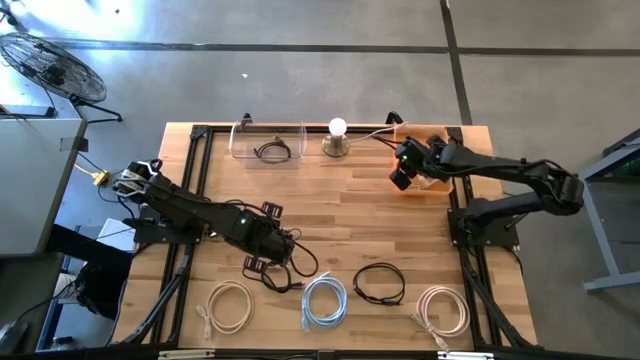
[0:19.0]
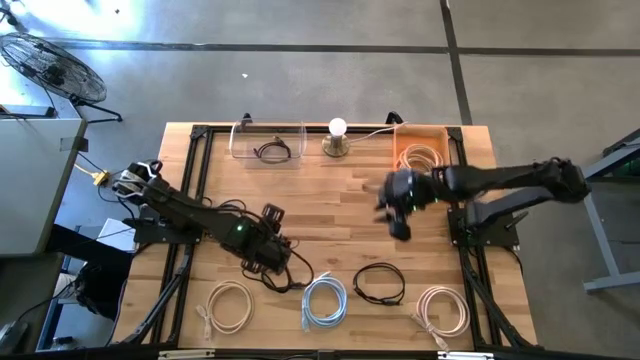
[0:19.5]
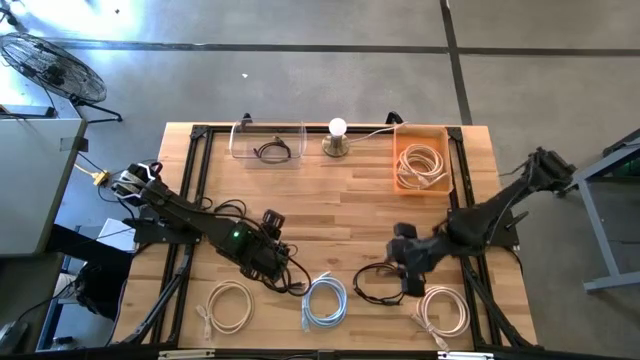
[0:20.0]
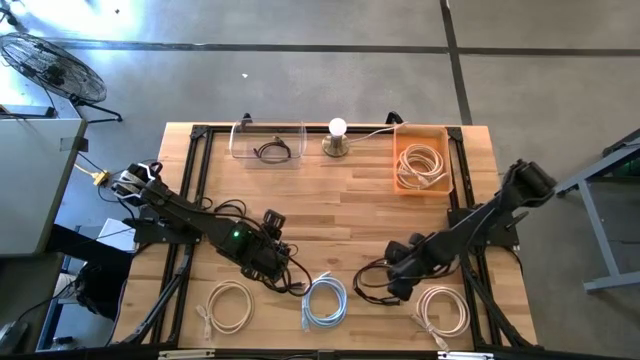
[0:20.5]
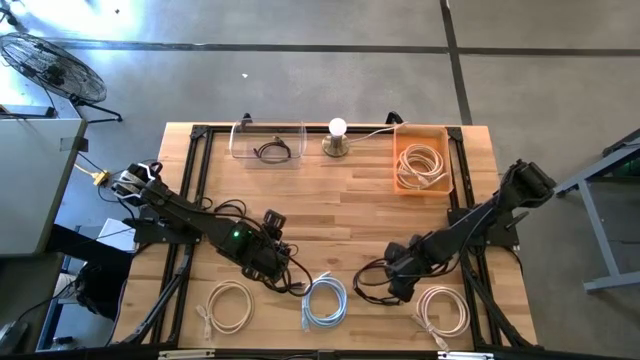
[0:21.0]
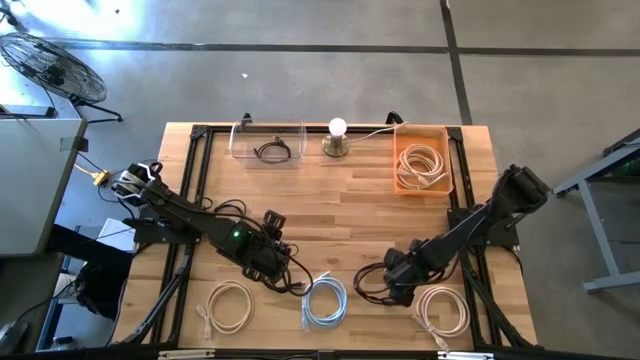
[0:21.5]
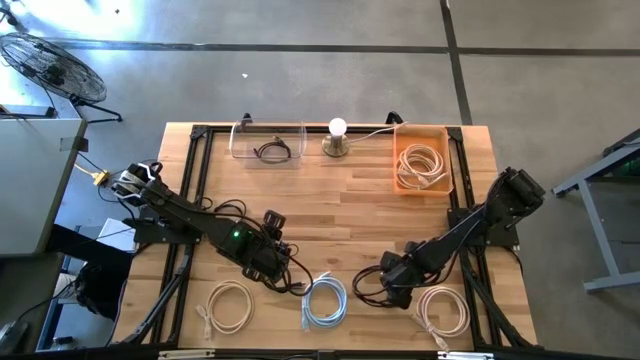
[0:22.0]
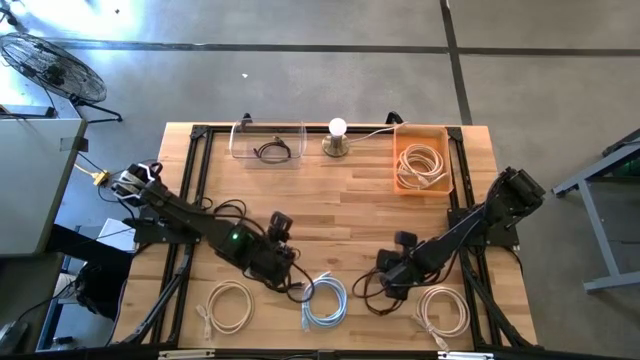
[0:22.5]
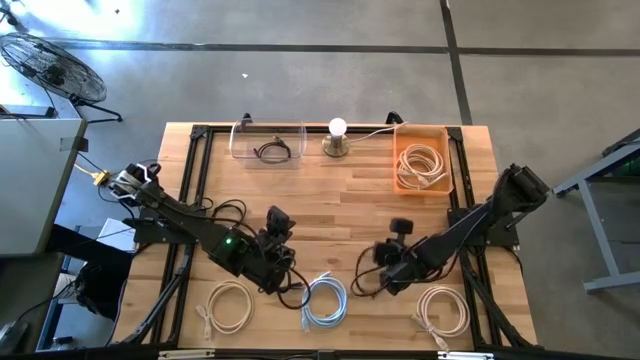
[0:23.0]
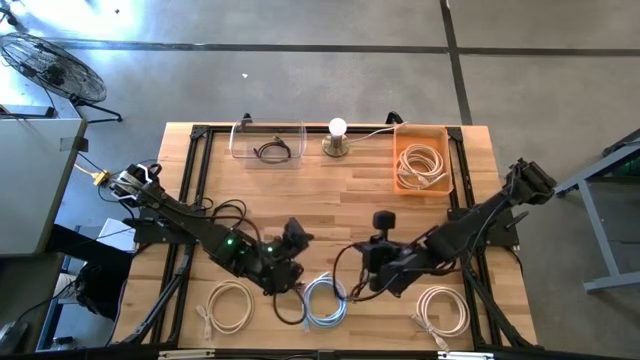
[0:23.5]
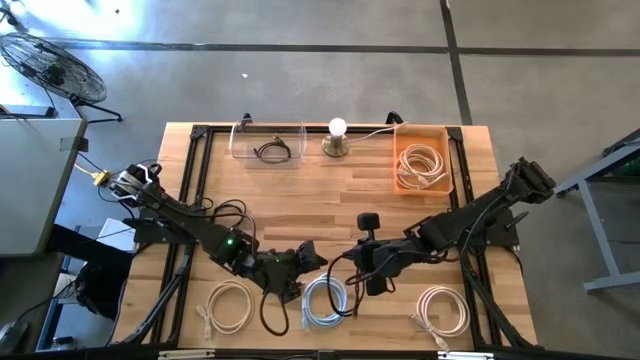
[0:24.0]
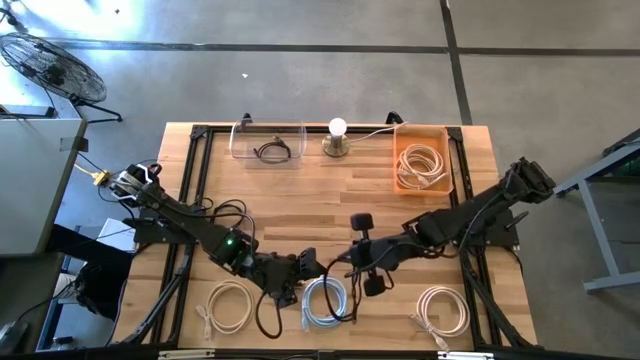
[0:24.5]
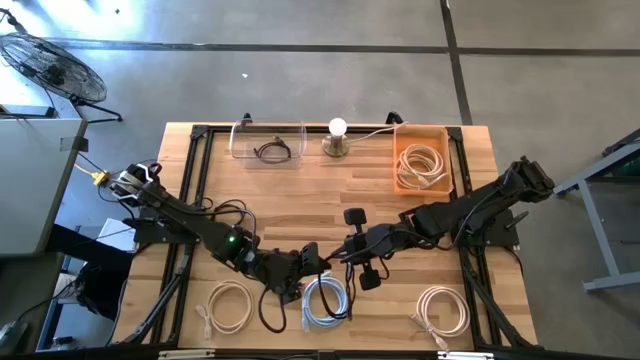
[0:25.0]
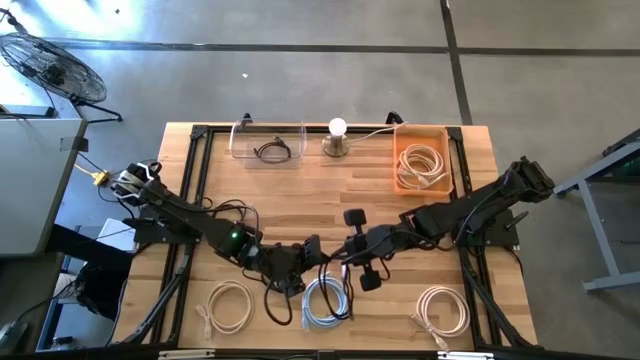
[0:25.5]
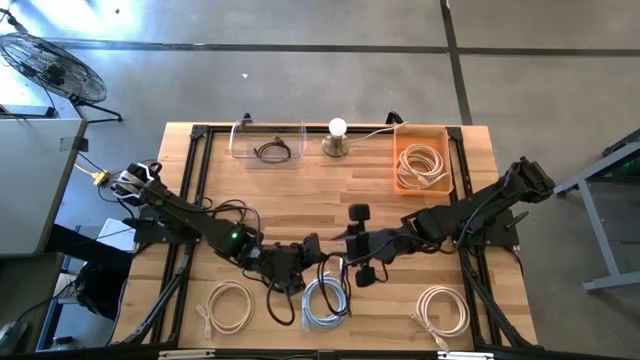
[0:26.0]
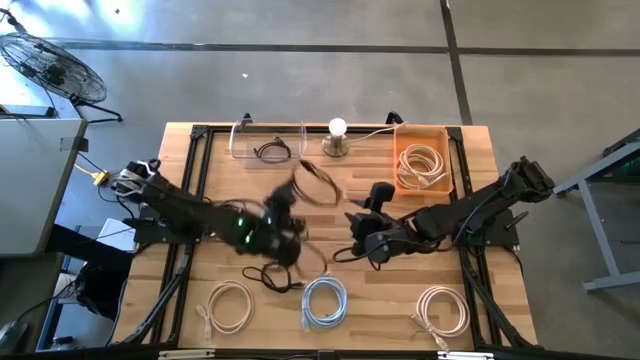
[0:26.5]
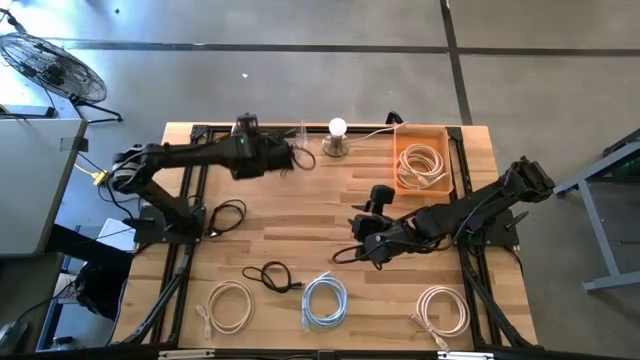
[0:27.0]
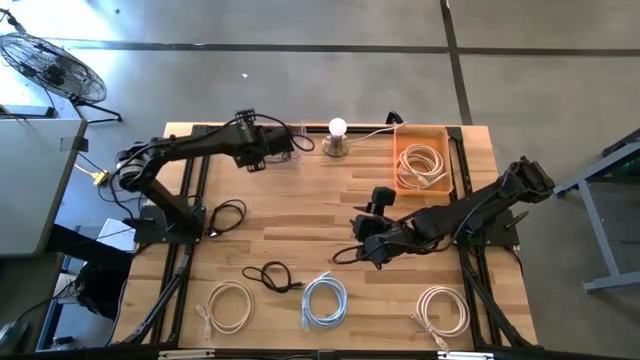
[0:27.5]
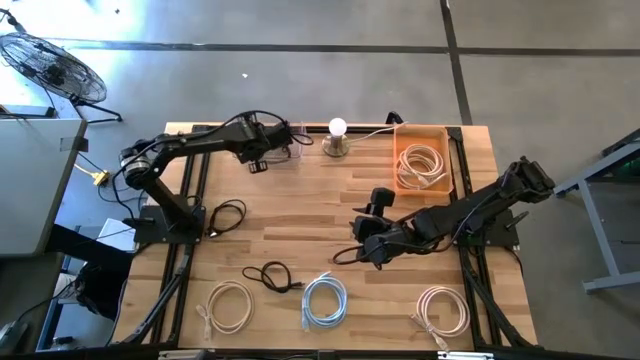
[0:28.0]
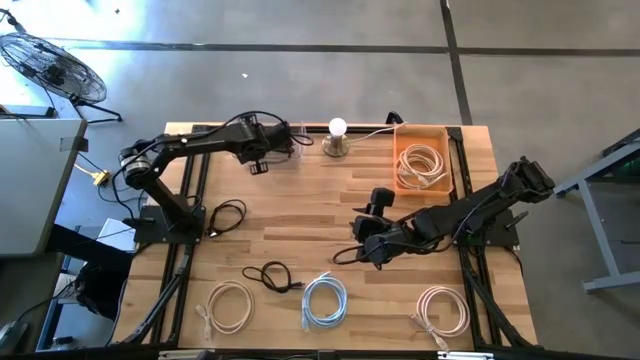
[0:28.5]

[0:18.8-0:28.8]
Task: Pick & Place USB Port
Put the black USB cable into the transparent bin

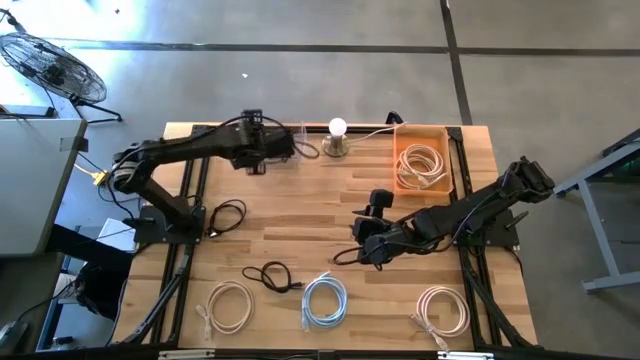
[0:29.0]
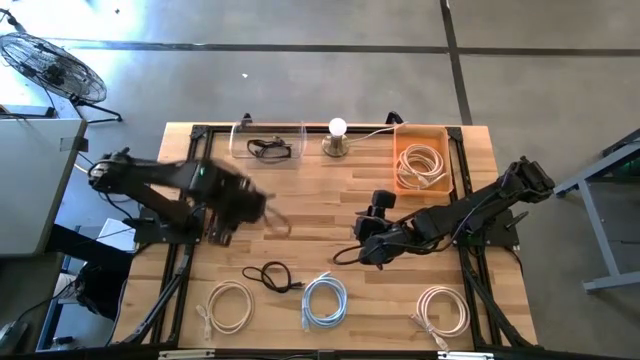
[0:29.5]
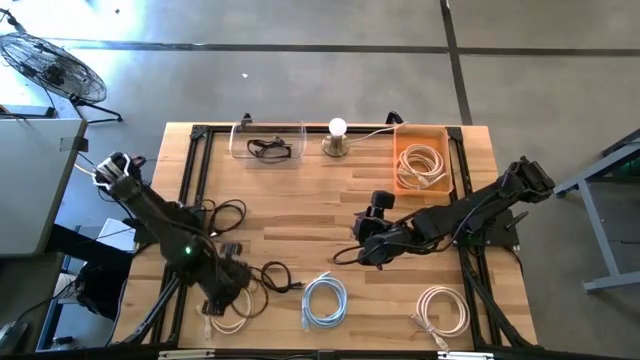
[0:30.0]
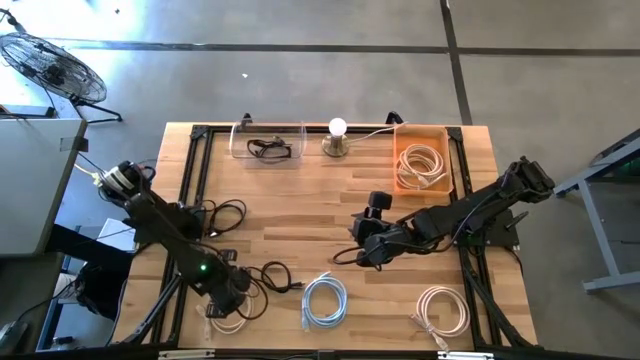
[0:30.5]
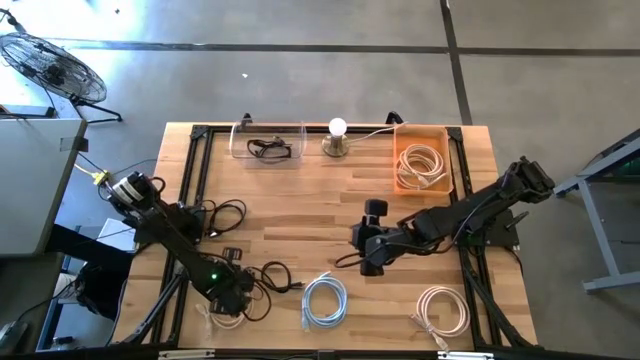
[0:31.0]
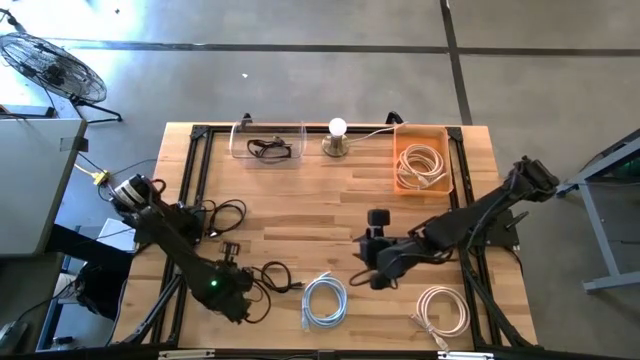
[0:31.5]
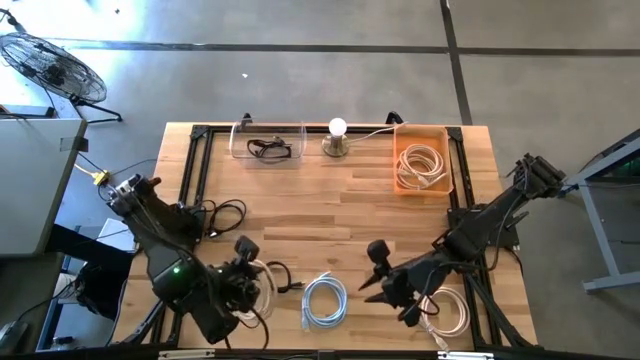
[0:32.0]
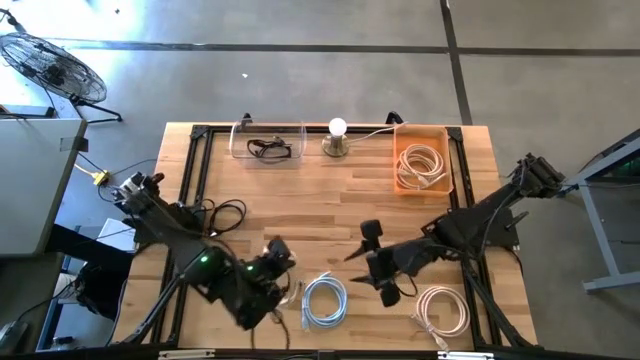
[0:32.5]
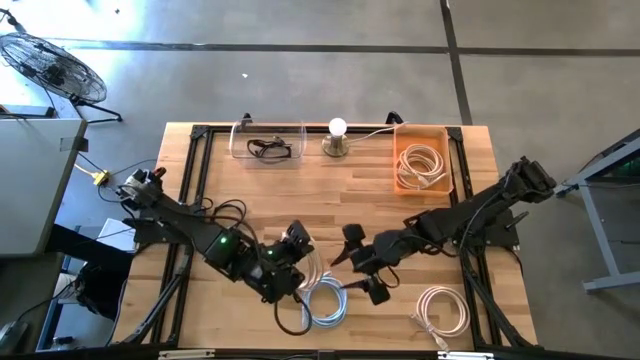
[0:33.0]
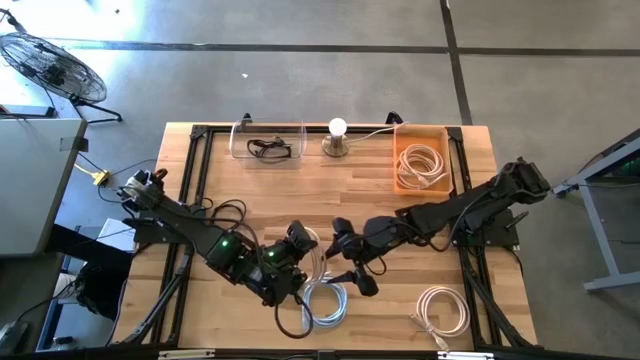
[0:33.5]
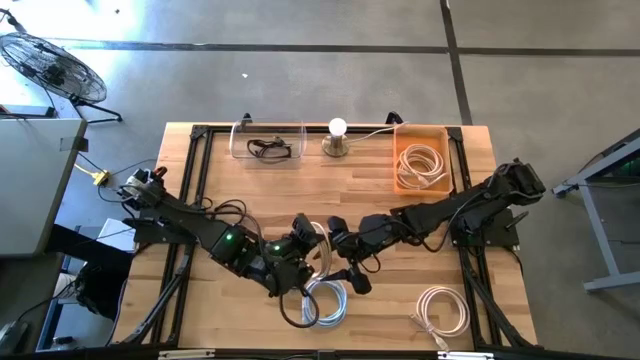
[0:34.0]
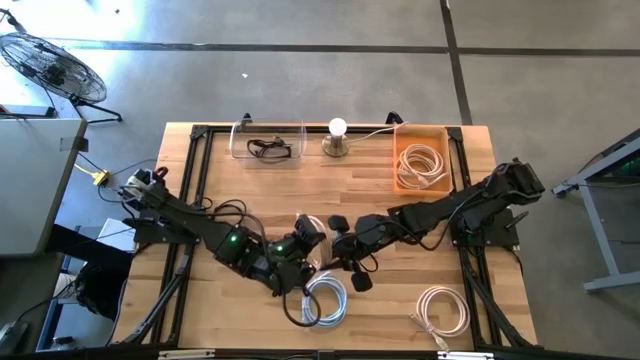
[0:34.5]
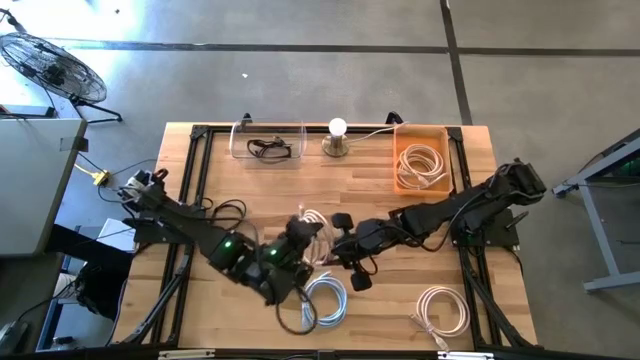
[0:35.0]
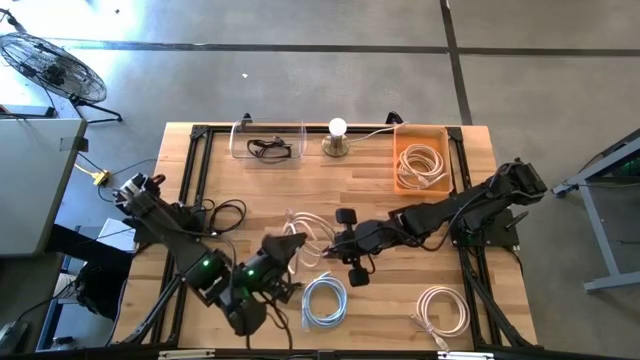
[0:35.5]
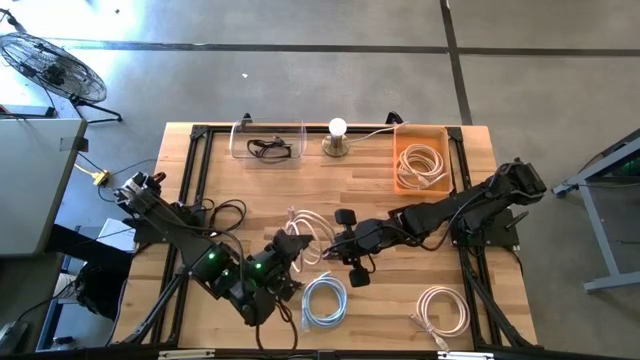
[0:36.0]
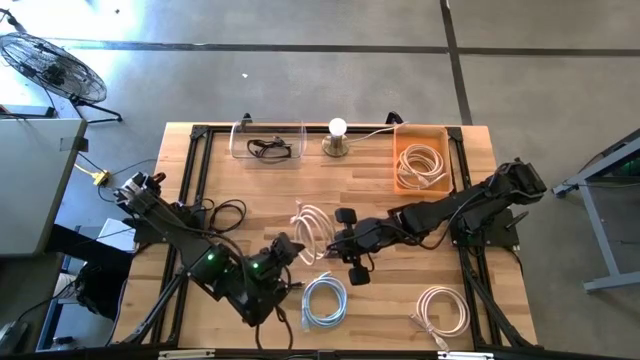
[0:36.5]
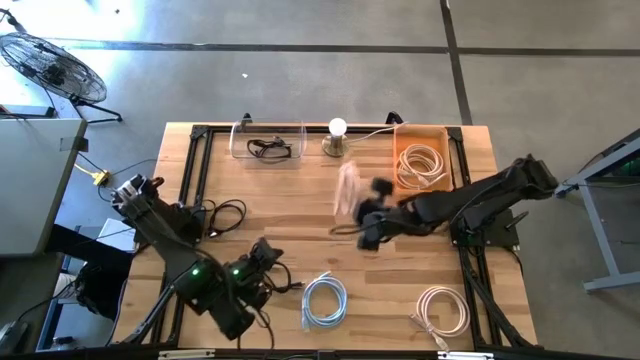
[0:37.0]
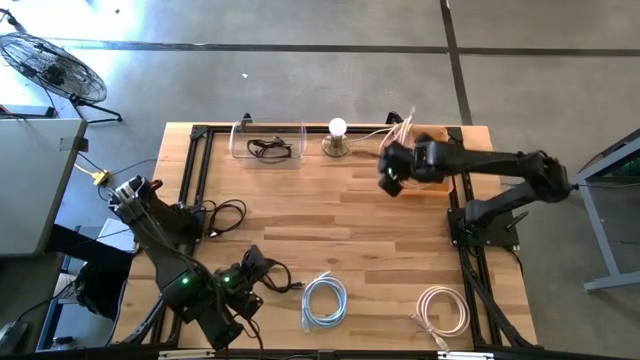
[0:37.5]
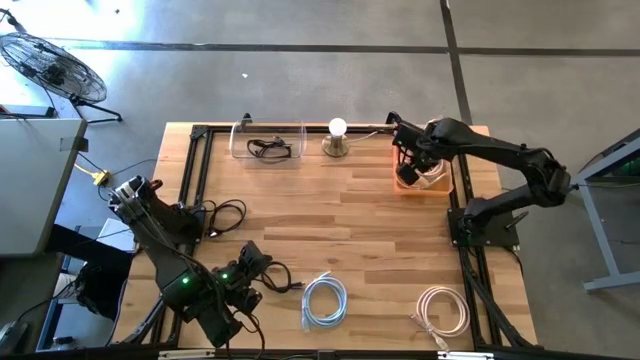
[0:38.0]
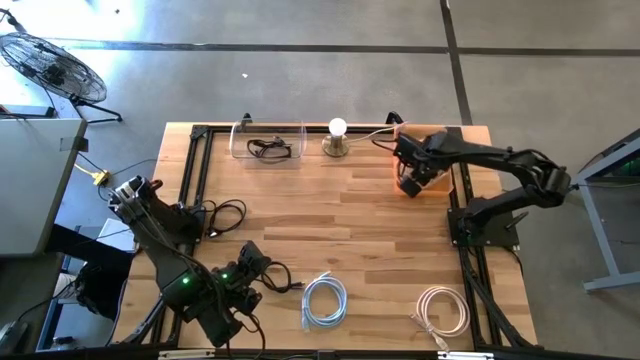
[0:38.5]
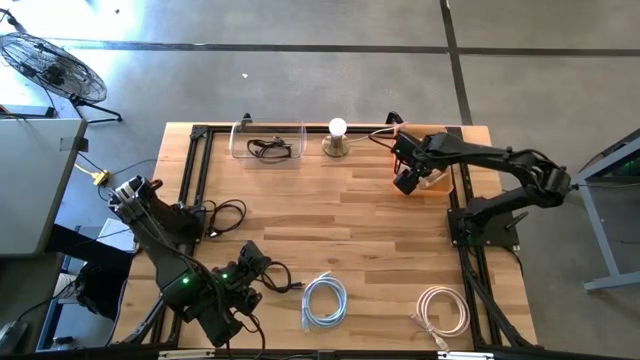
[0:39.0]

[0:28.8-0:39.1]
Put the white HDMI cable into the orange bin
